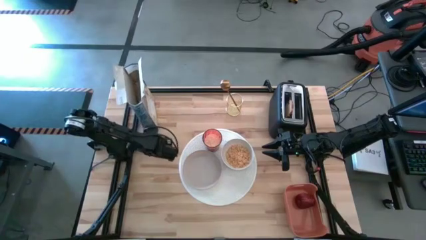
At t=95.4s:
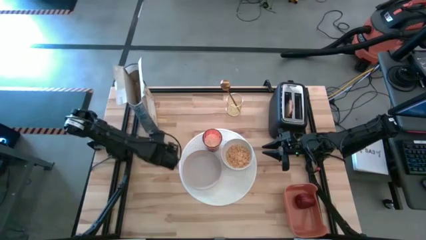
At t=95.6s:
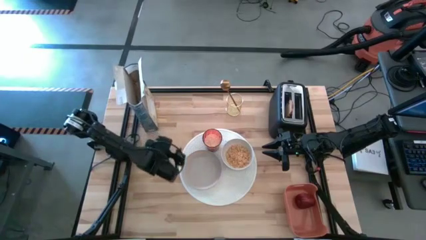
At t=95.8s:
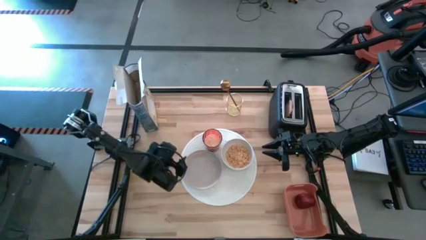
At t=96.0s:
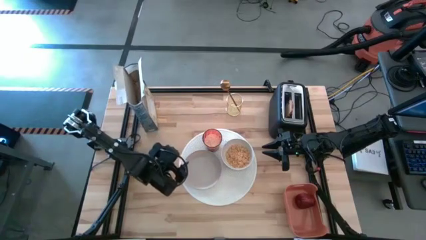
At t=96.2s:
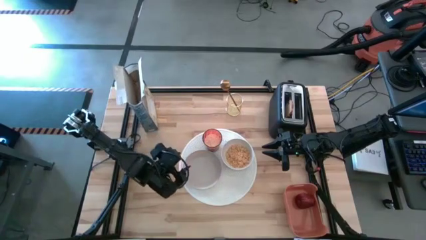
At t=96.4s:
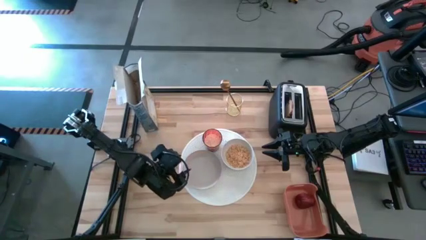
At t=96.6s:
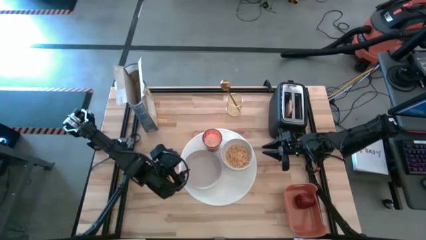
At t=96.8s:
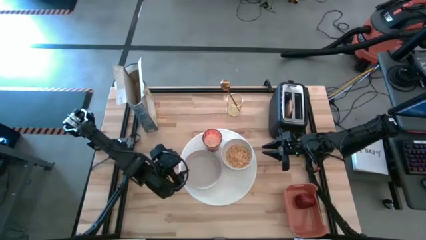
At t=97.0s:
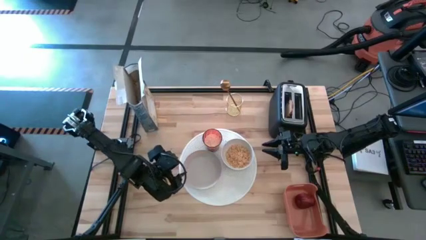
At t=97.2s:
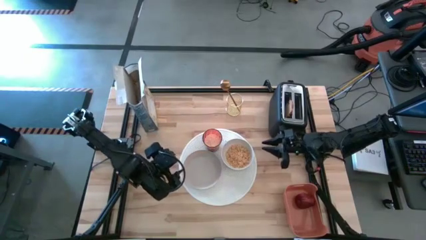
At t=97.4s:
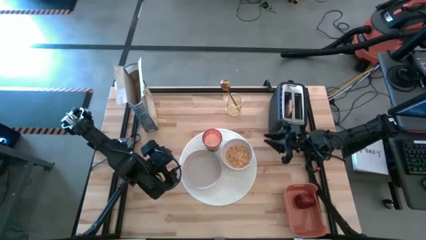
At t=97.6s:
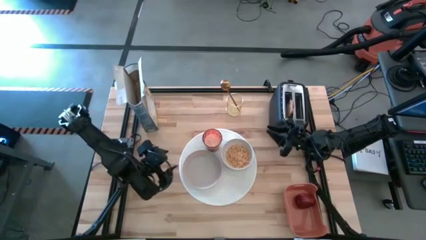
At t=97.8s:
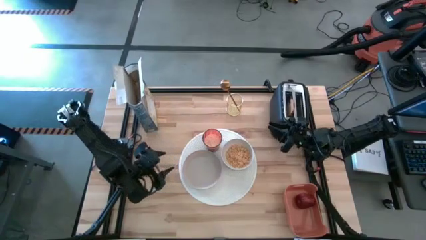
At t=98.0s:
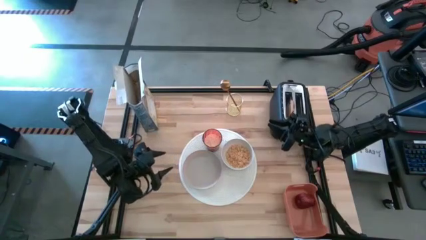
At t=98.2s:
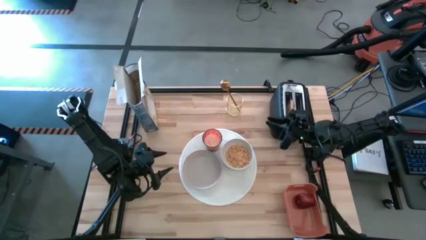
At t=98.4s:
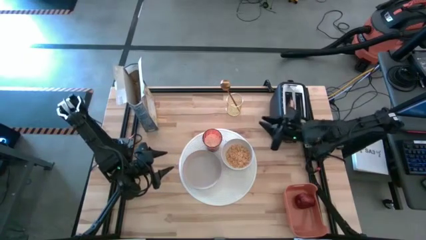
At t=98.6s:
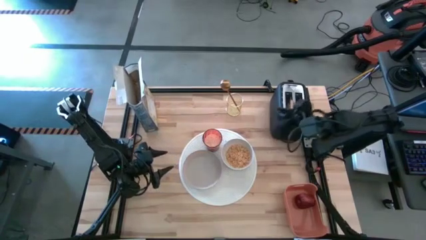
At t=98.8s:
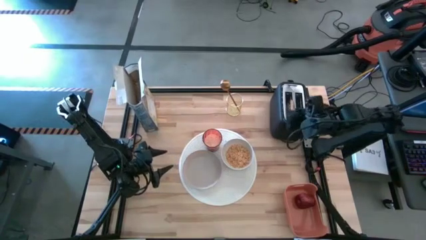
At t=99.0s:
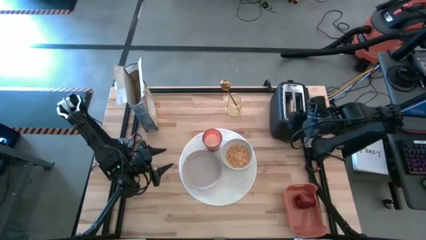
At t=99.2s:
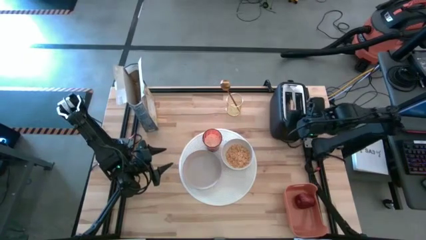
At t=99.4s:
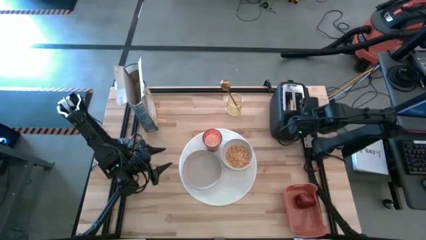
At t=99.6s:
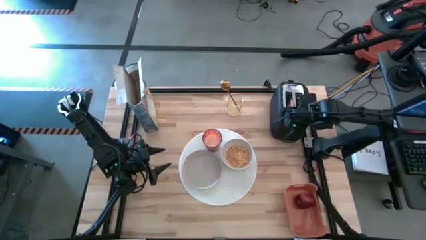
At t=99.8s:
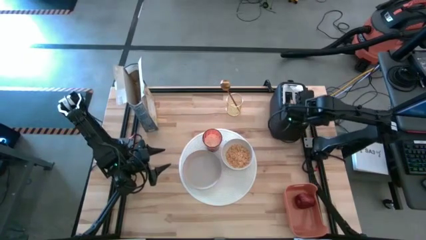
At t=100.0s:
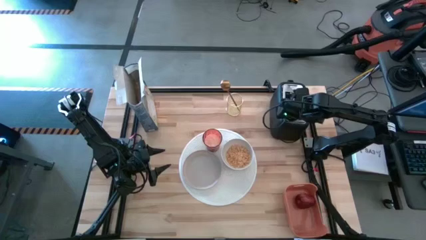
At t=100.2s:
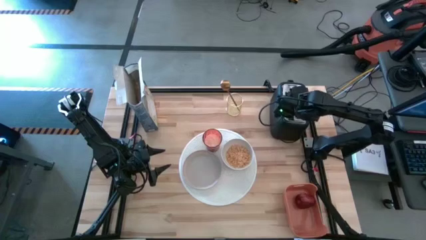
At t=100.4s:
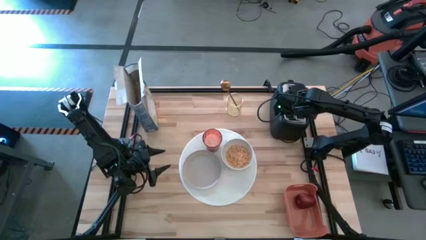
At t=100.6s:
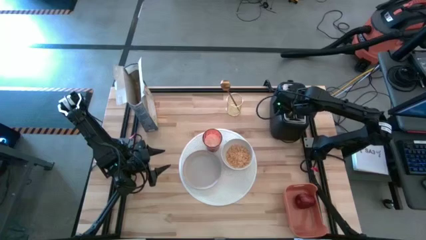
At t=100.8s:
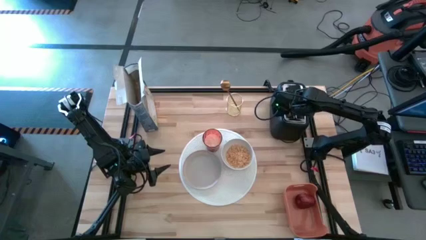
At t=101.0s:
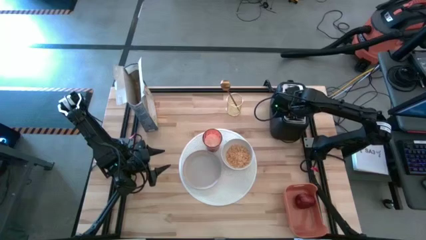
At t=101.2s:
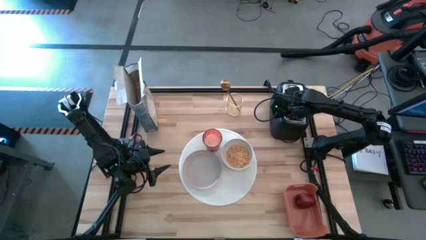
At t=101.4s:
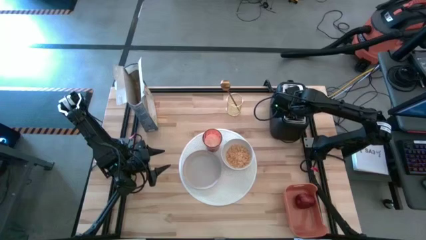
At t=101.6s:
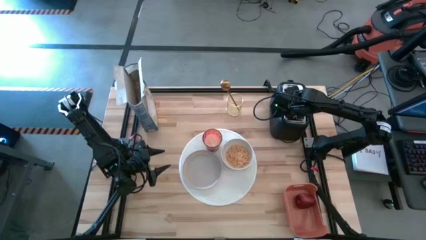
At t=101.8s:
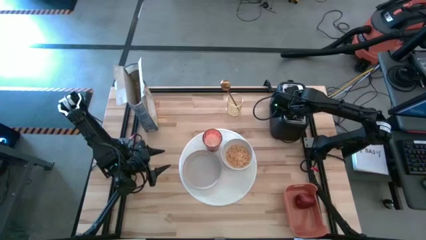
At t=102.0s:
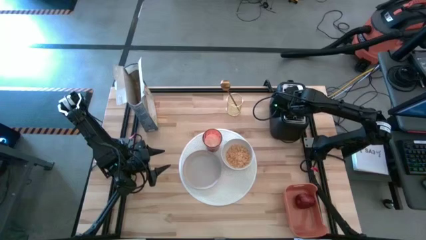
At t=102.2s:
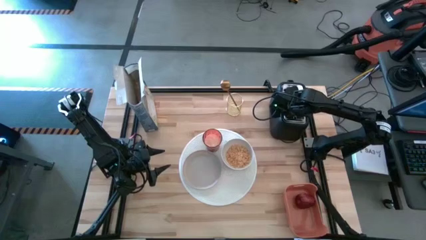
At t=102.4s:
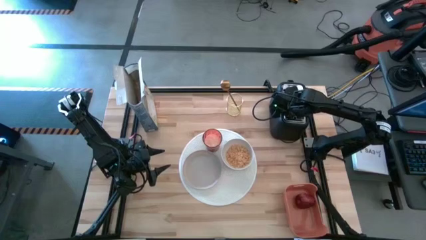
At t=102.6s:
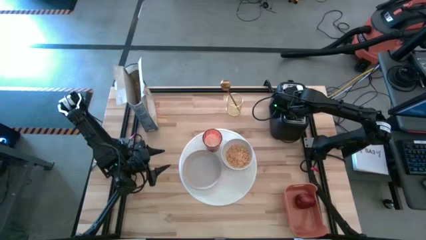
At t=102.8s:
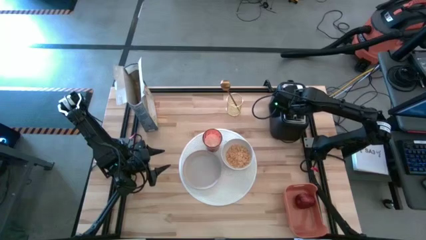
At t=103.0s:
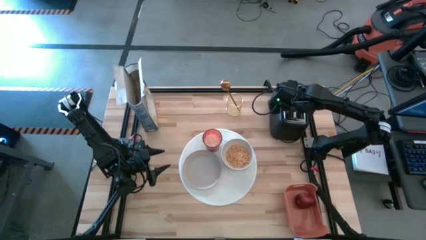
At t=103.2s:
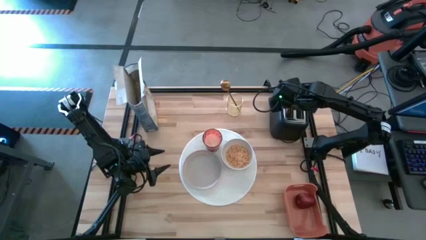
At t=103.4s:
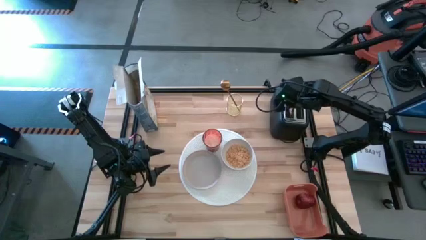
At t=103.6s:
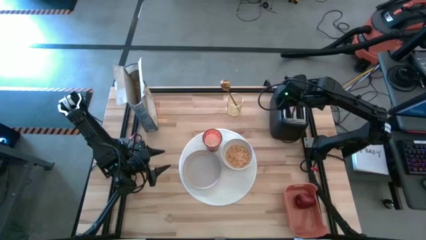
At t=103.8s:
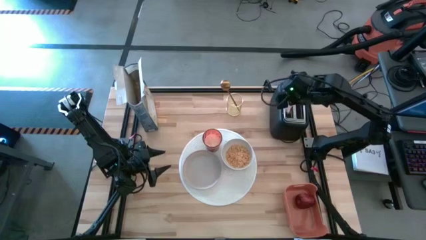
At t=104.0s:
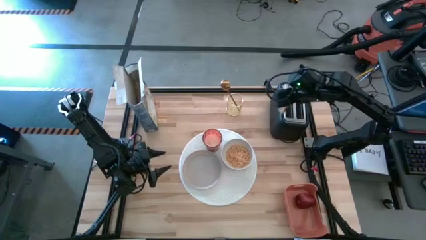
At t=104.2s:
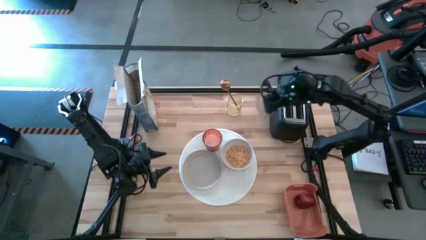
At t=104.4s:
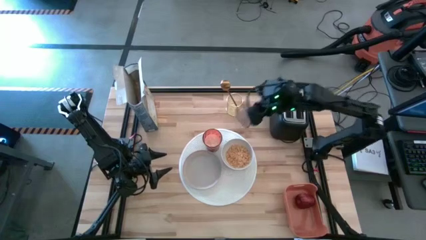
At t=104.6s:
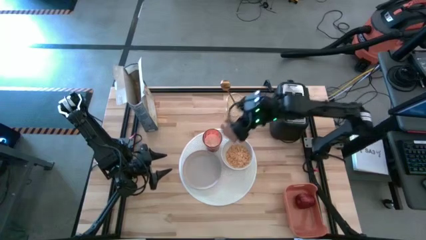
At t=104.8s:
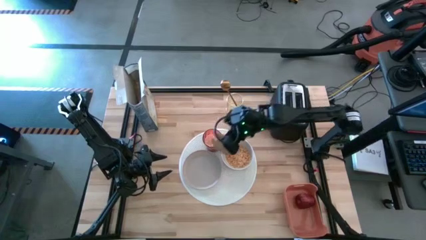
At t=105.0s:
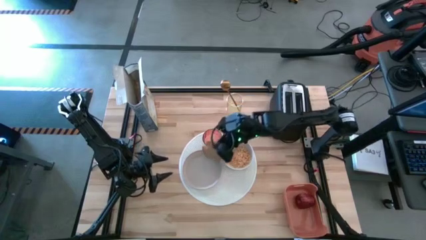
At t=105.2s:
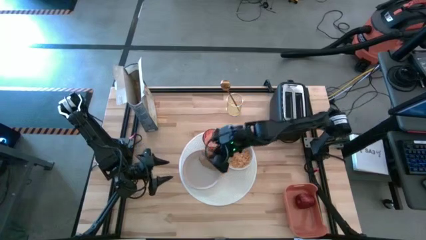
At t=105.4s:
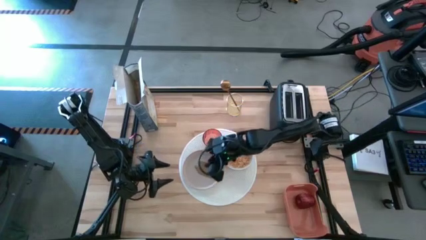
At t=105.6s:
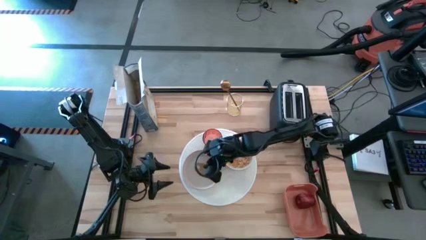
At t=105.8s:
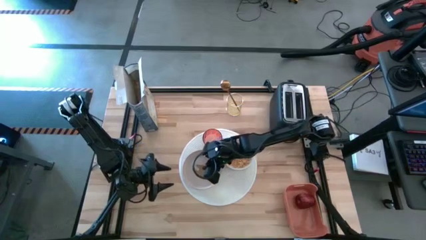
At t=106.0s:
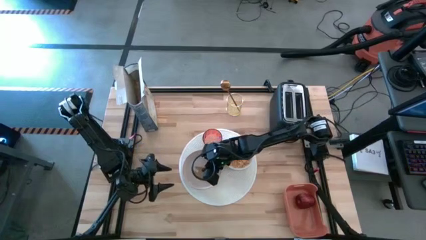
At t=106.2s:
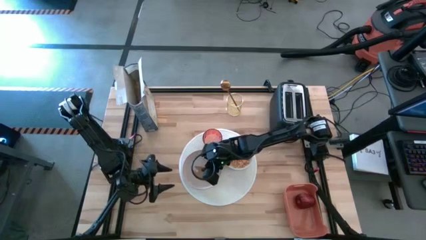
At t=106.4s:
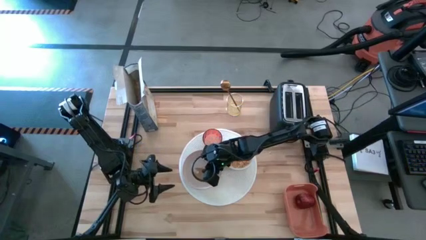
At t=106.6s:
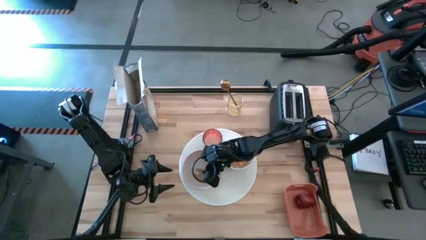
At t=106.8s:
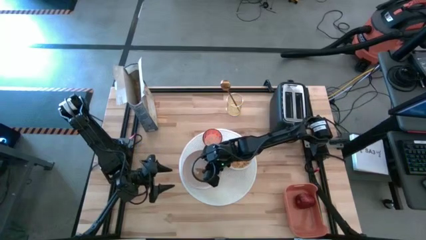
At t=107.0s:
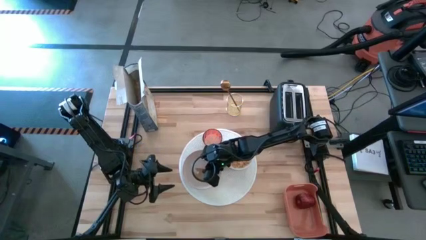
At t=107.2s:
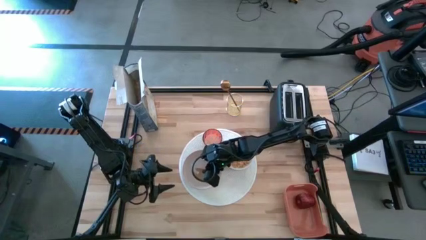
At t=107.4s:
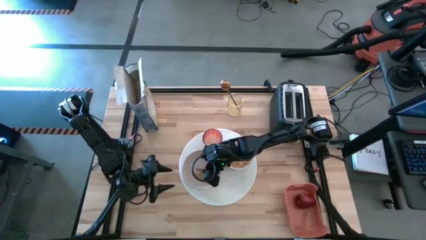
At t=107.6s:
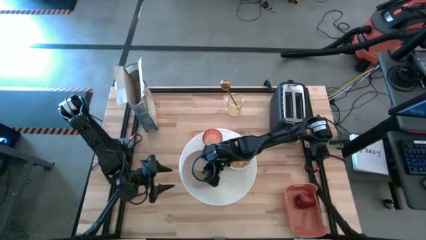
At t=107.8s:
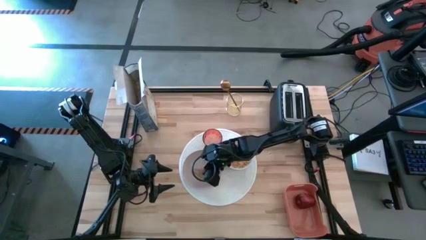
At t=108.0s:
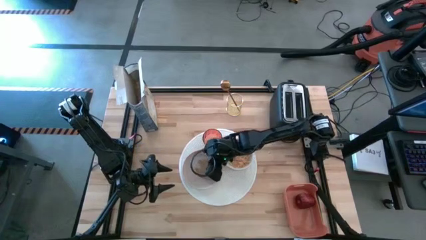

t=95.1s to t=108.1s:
Task: Arrange a breakfast setting
Put the bagel from the toaster on the white plate
